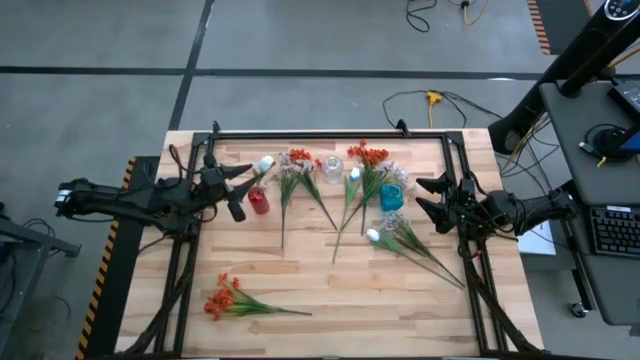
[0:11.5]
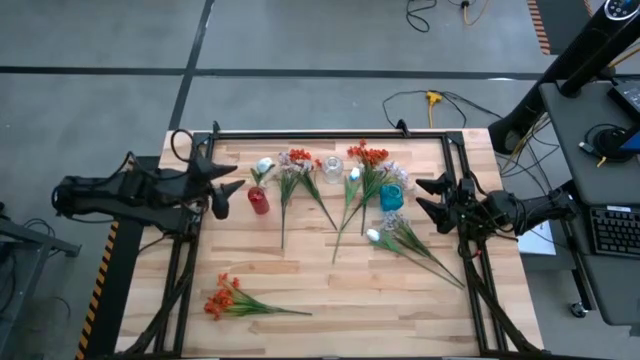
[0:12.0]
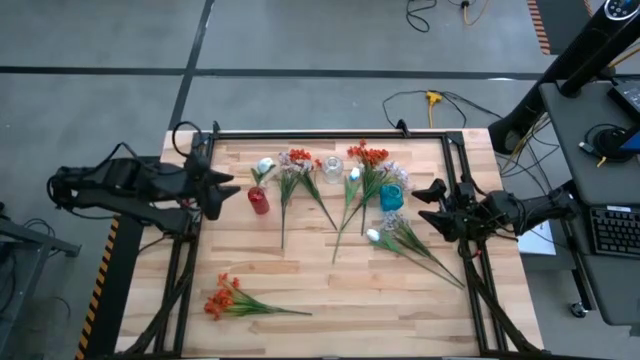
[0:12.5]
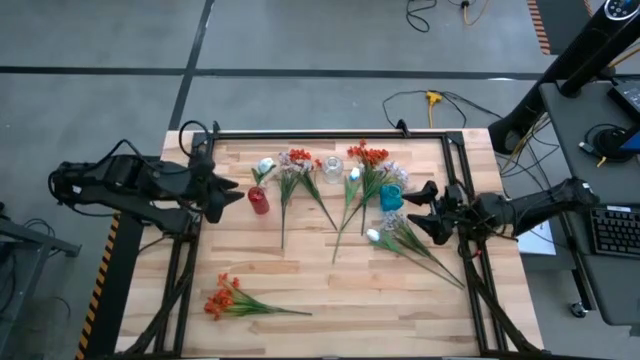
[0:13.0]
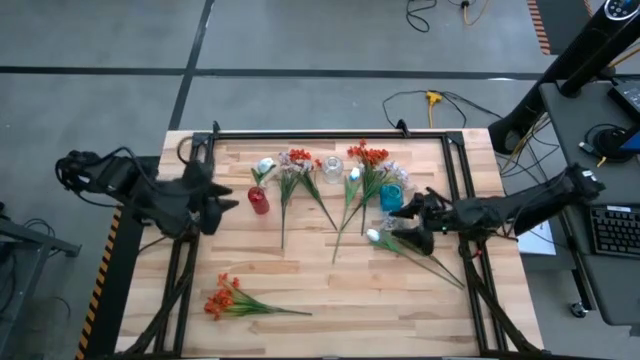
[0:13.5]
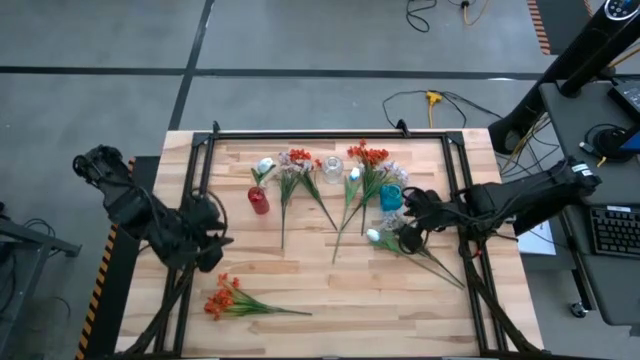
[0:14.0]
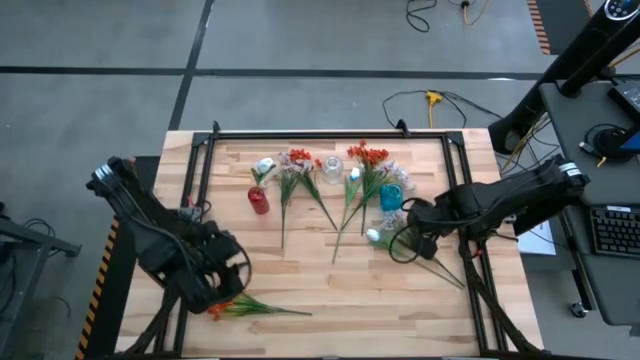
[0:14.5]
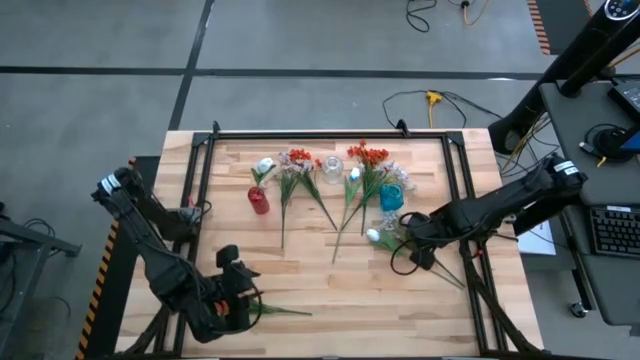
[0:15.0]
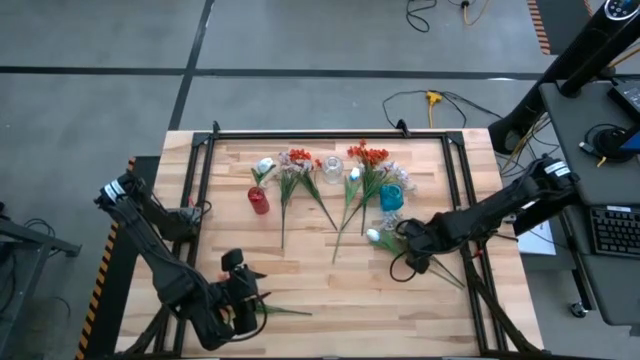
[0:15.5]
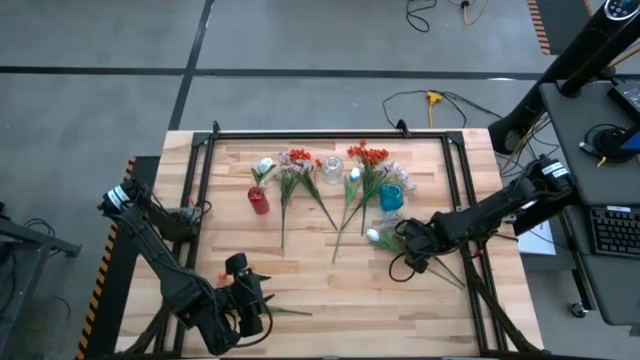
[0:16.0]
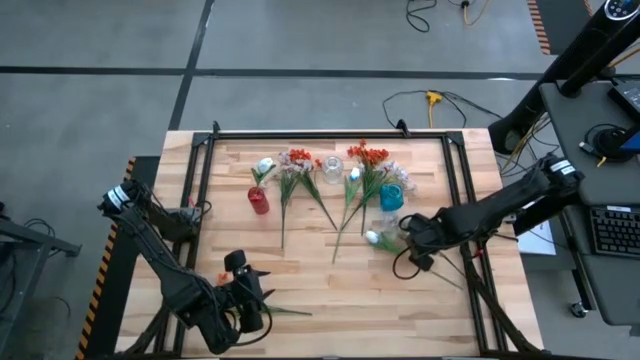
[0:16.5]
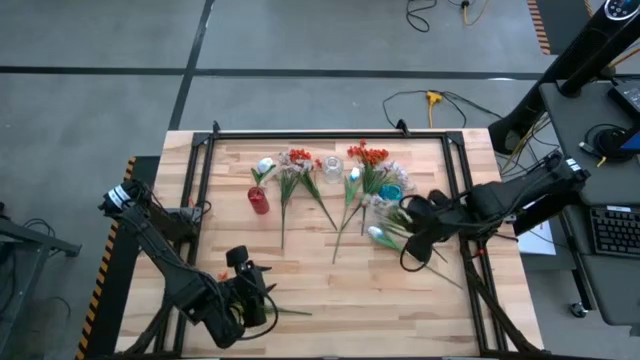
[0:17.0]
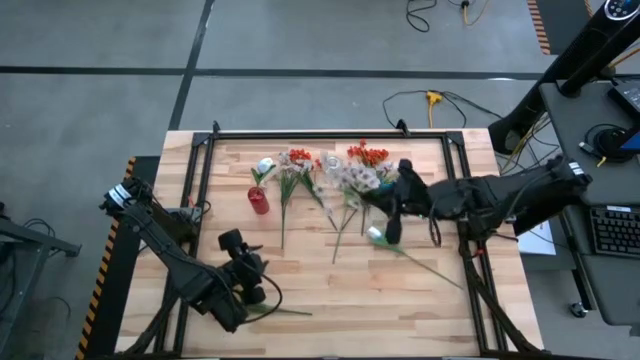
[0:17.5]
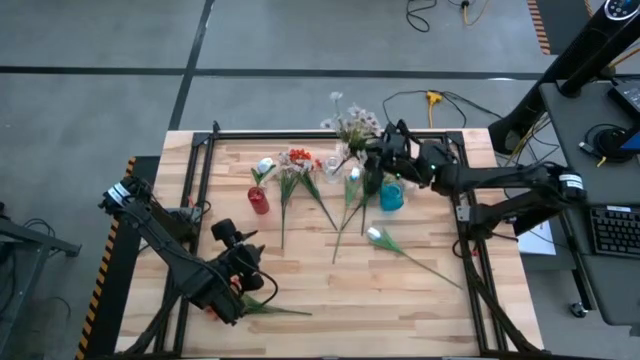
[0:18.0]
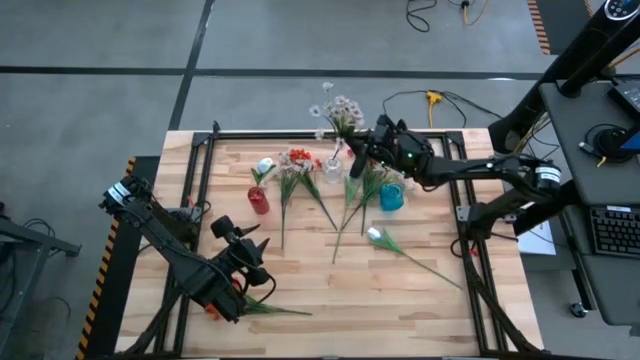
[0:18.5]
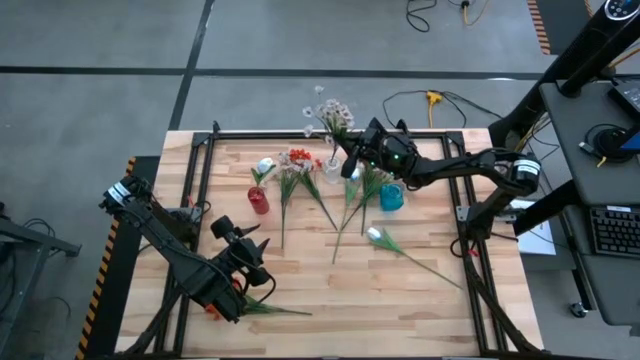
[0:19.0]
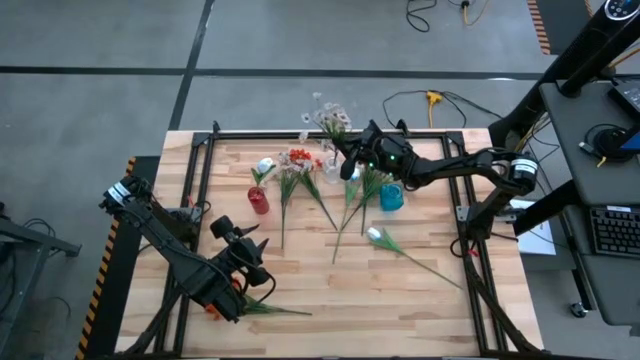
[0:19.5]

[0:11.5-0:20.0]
Task: Sort flowers into vase by color
Put the bottom white flowers into the transparent vase

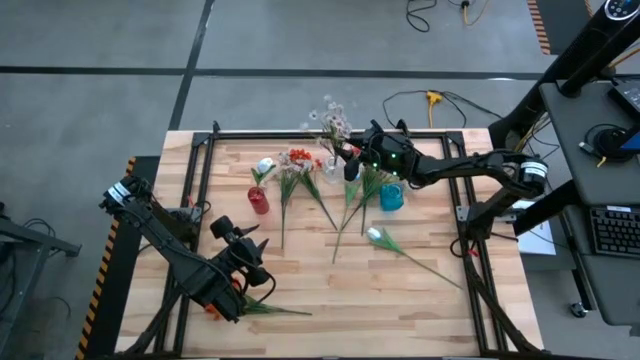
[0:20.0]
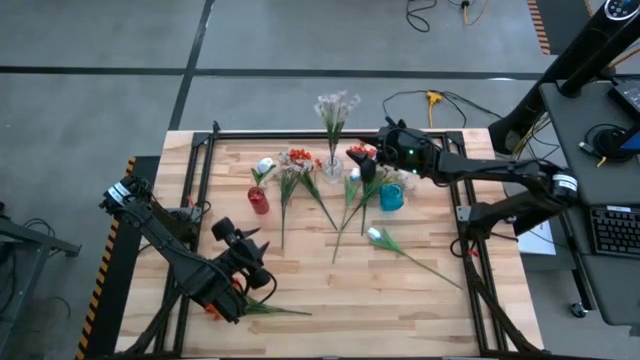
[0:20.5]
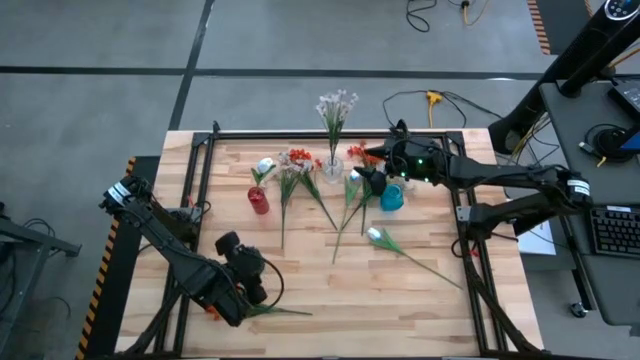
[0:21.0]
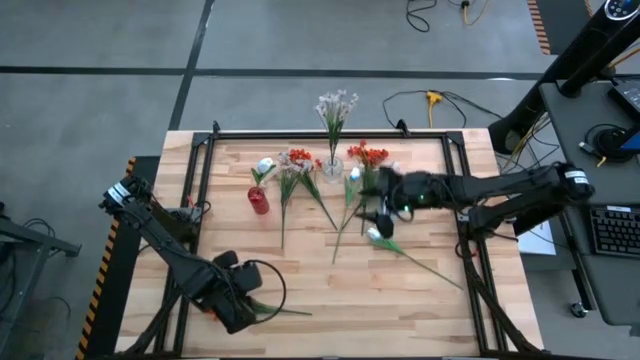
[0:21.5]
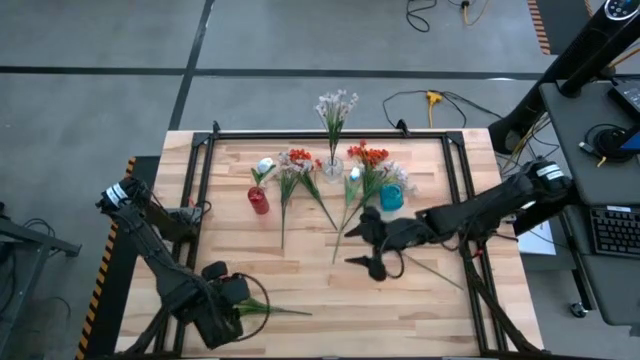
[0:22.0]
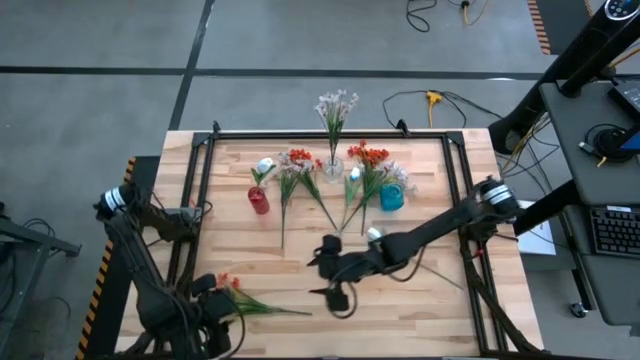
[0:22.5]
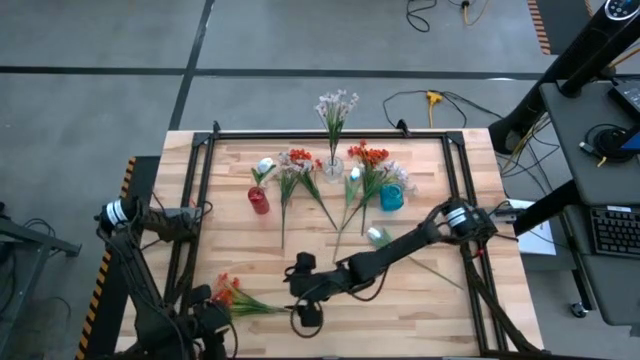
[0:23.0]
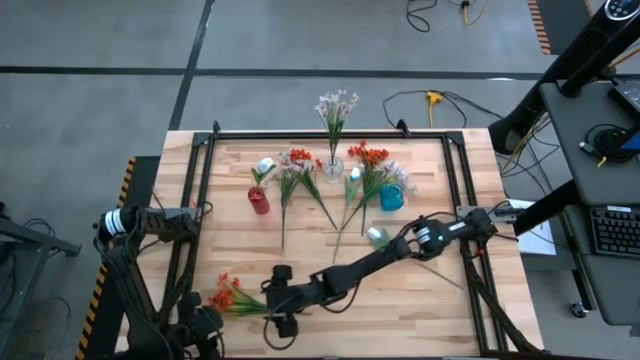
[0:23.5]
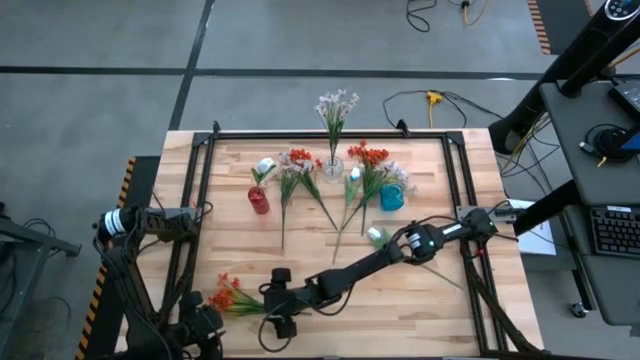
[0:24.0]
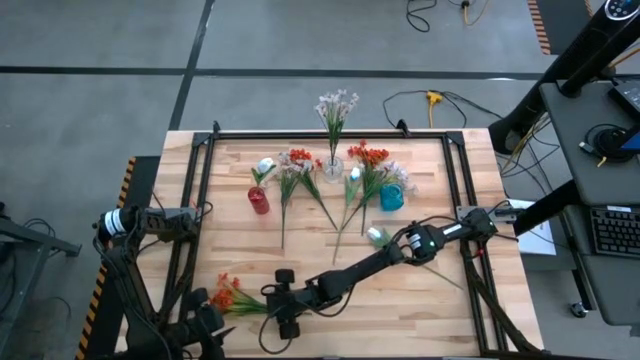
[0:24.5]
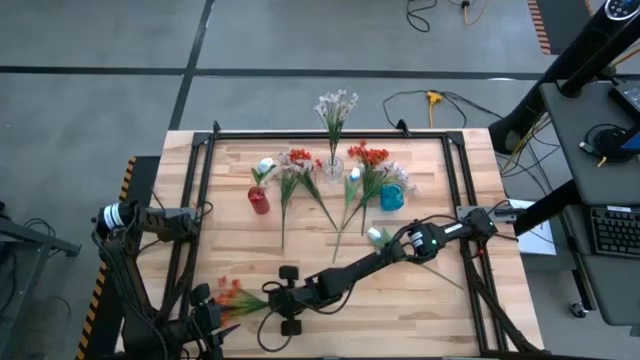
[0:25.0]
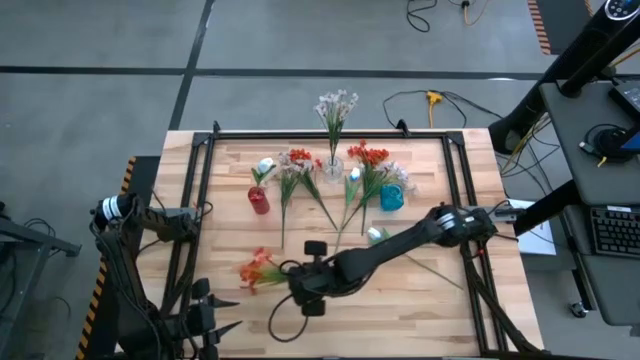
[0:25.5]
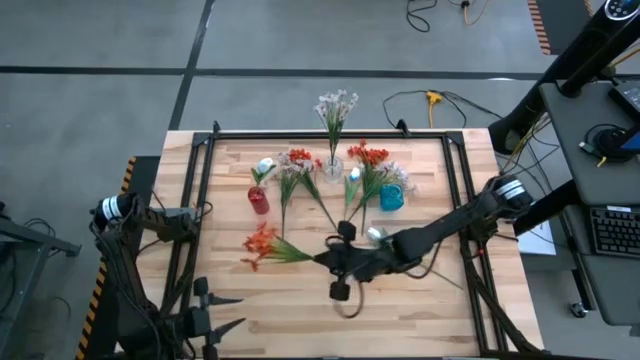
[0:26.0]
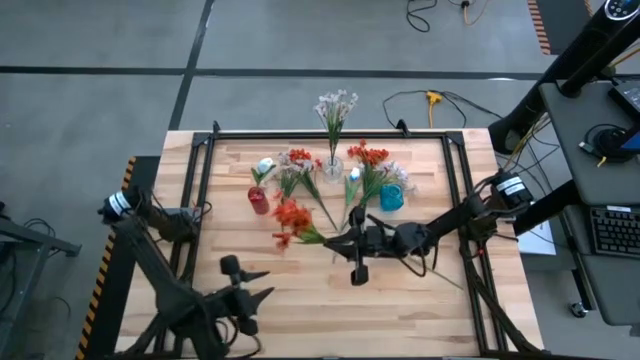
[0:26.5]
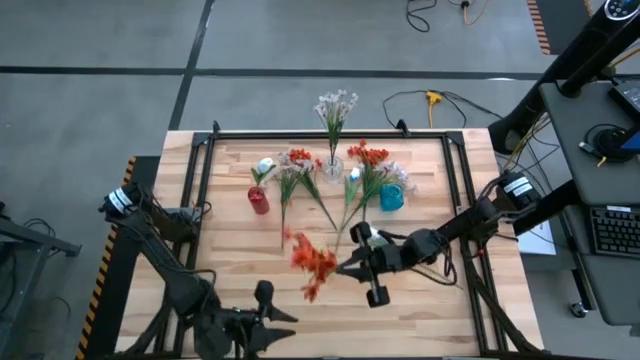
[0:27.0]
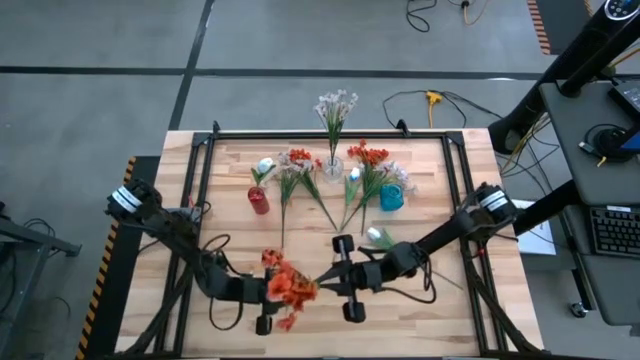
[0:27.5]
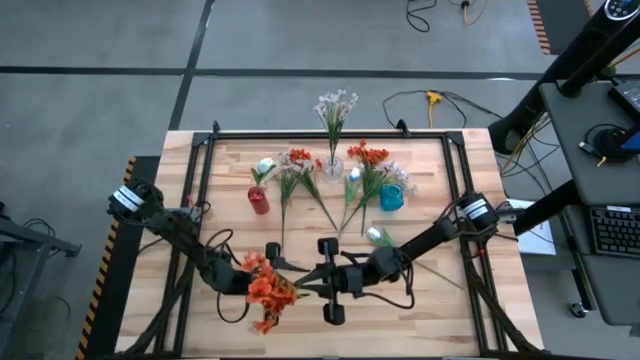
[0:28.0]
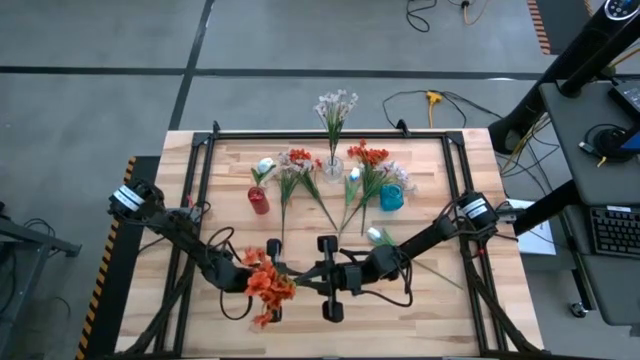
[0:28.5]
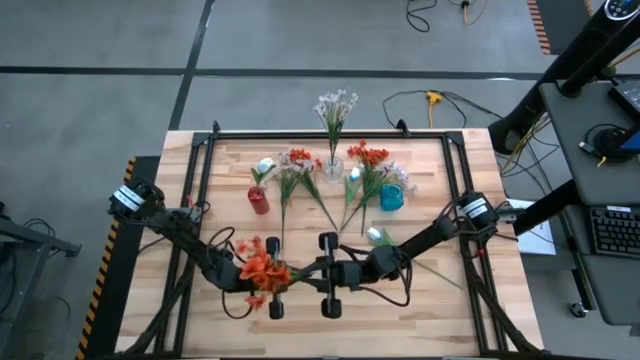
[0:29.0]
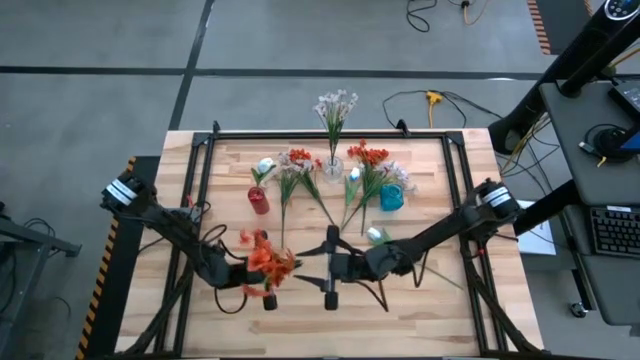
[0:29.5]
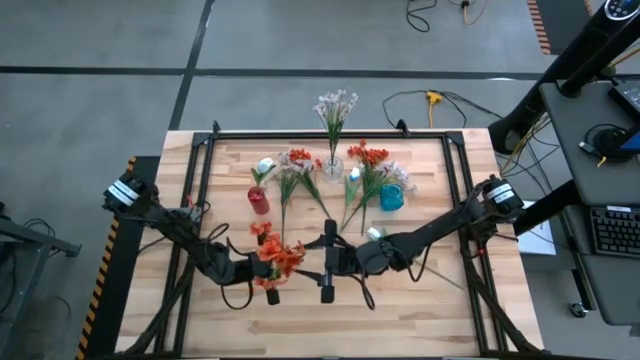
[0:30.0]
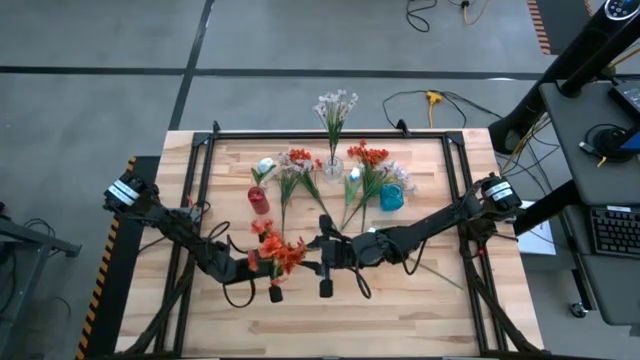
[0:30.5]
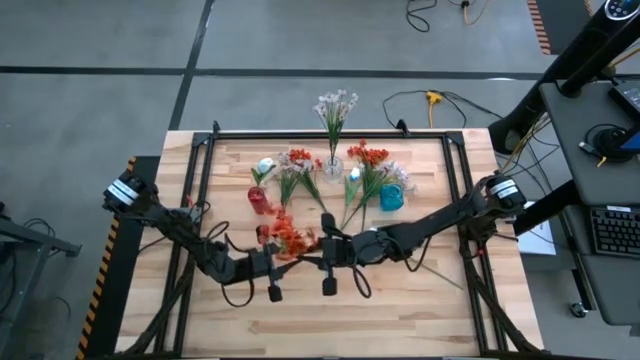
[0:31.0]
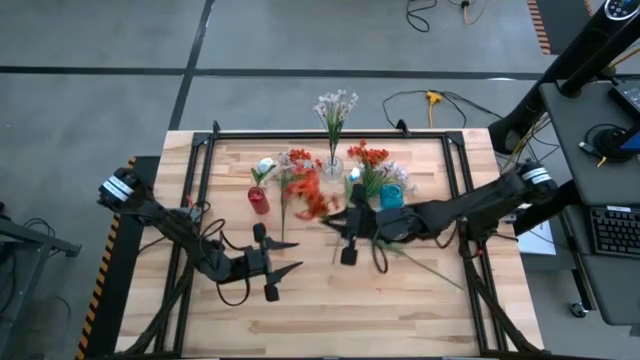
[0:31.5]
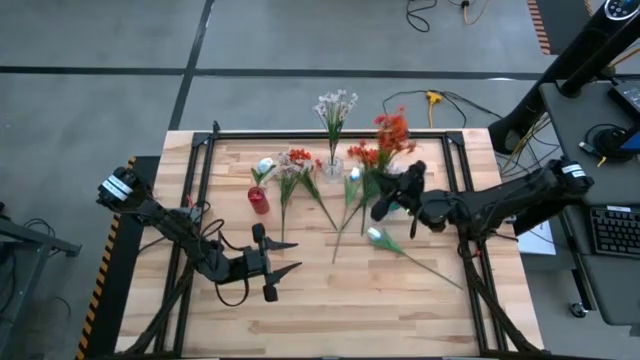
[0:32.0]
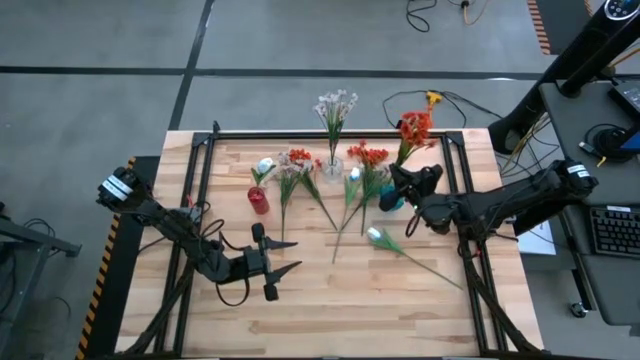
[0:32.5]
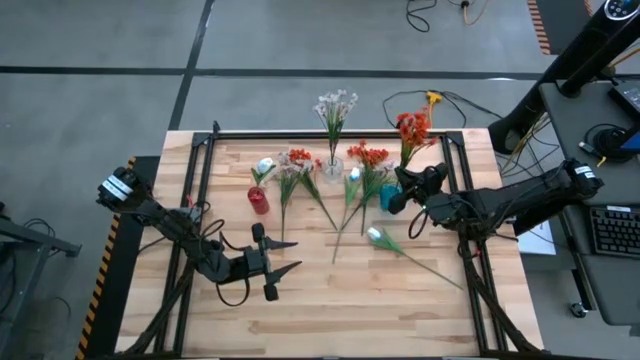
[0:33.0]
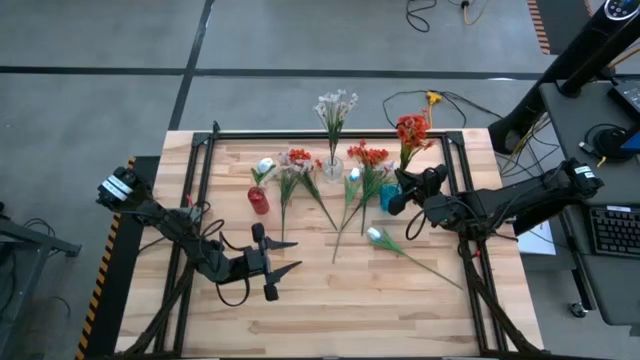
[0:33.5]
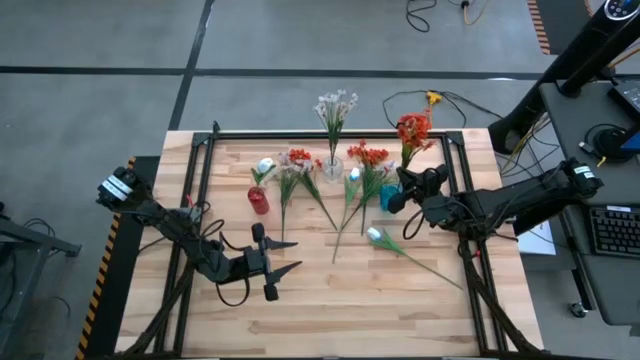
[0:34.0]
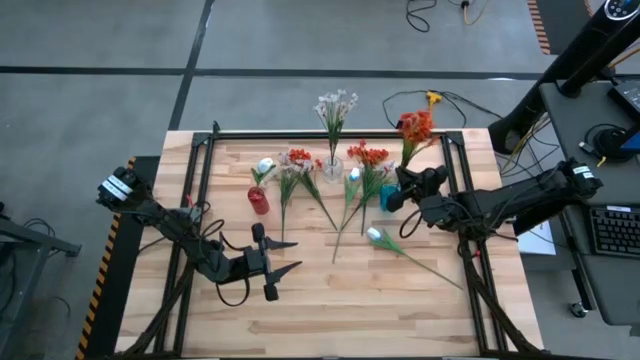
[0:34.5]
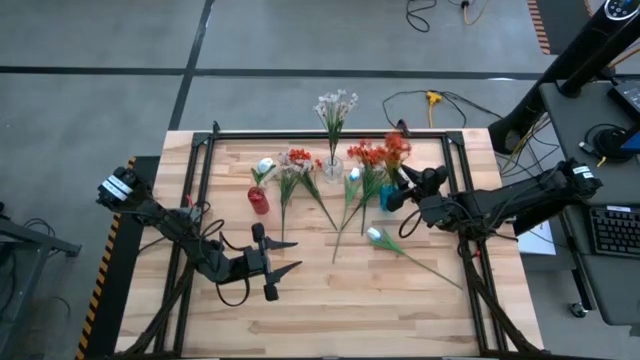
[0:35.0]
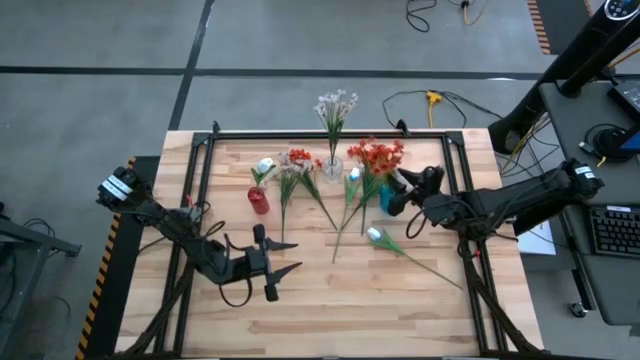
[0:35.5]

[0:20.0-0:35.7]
Put the bottom orange flowers into the blue vase
